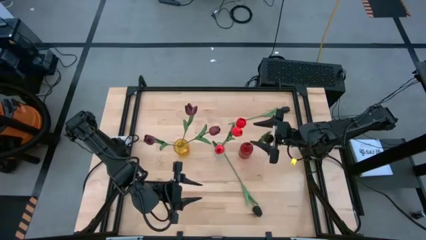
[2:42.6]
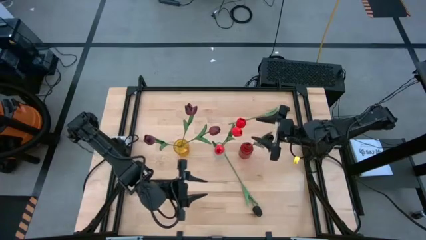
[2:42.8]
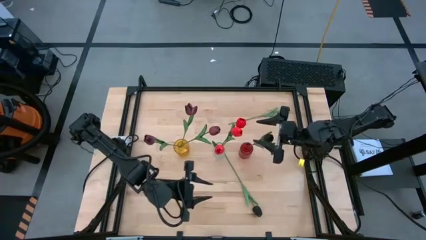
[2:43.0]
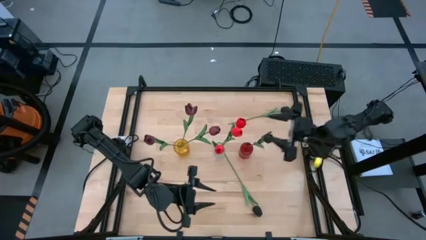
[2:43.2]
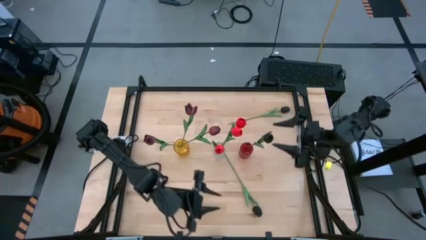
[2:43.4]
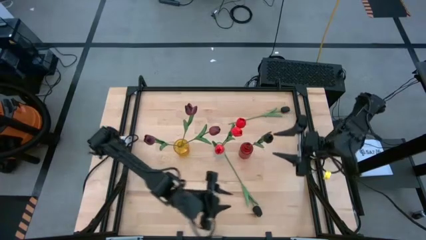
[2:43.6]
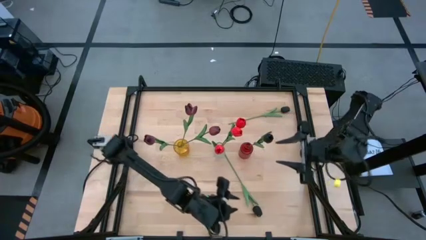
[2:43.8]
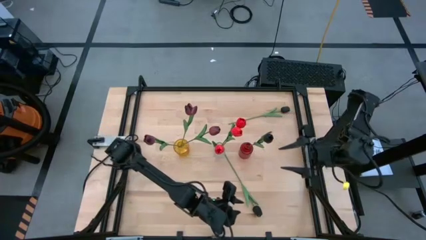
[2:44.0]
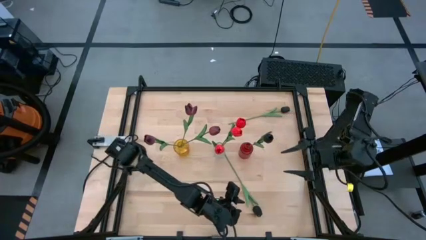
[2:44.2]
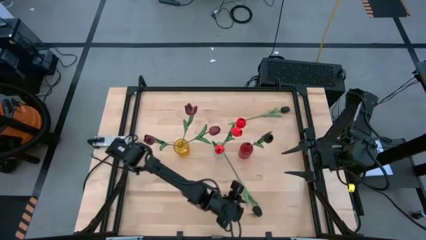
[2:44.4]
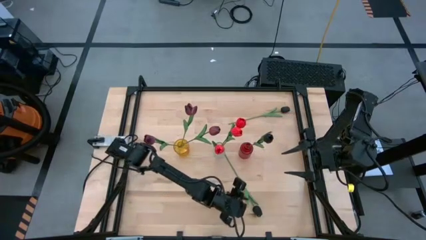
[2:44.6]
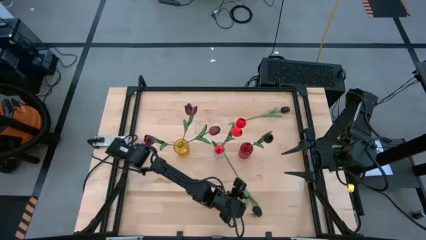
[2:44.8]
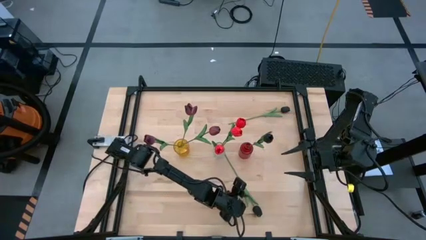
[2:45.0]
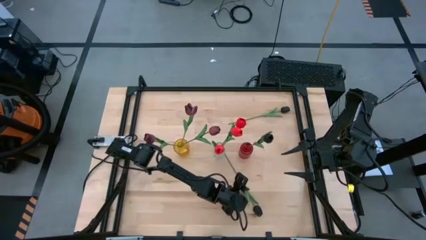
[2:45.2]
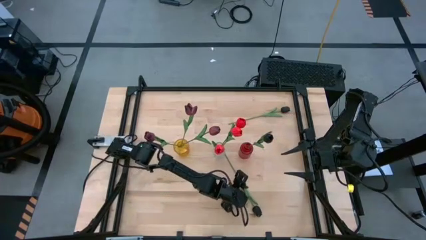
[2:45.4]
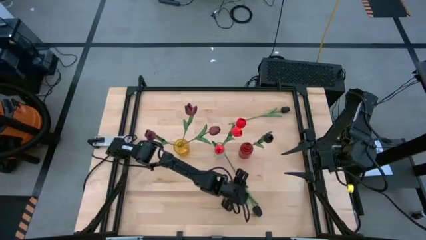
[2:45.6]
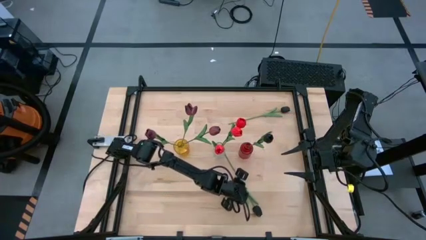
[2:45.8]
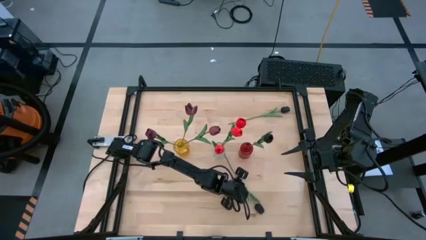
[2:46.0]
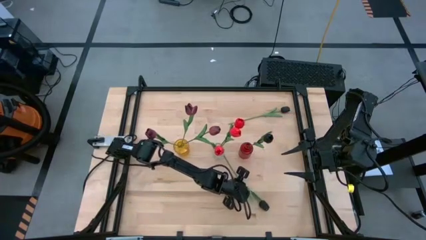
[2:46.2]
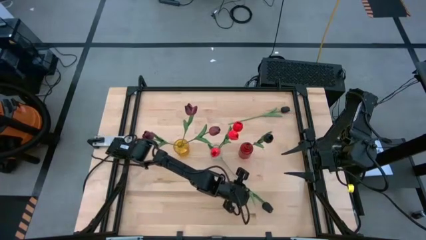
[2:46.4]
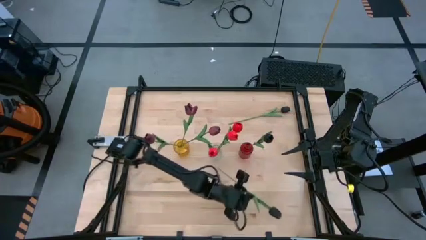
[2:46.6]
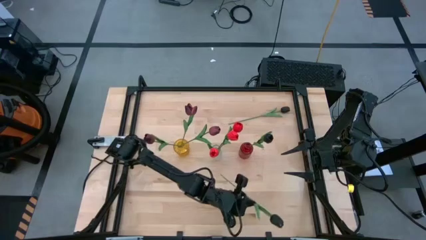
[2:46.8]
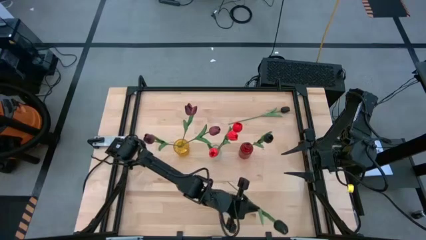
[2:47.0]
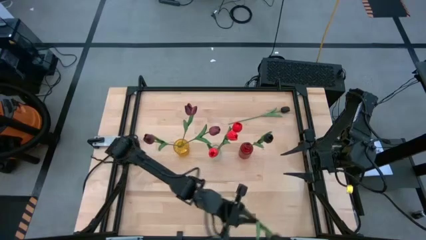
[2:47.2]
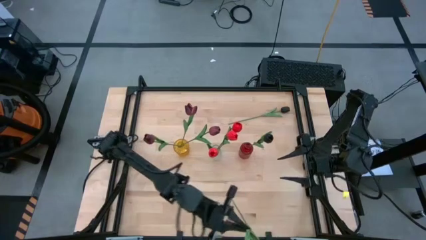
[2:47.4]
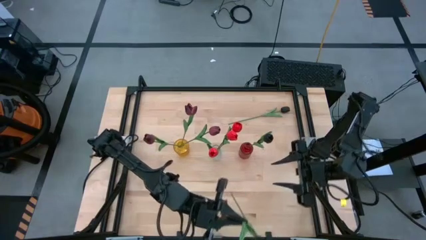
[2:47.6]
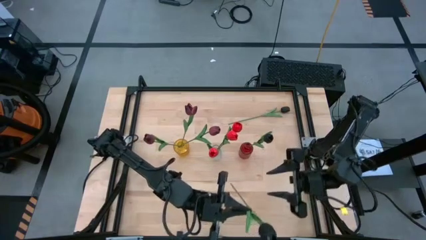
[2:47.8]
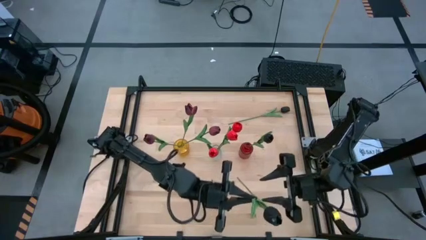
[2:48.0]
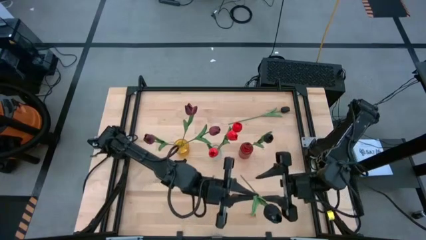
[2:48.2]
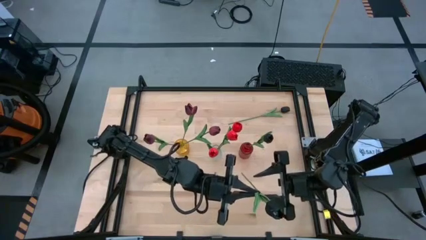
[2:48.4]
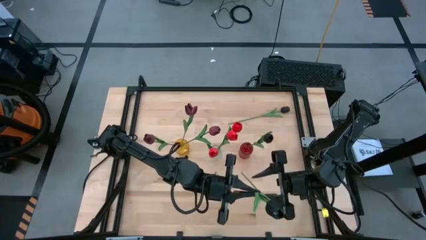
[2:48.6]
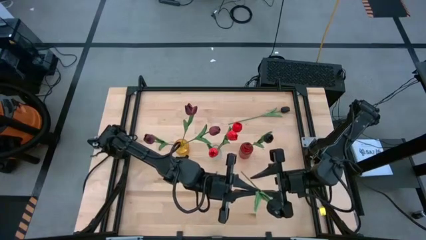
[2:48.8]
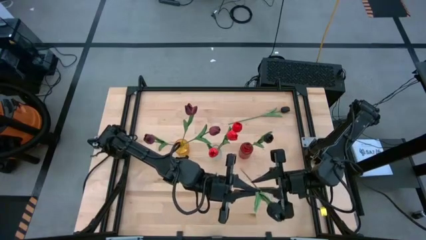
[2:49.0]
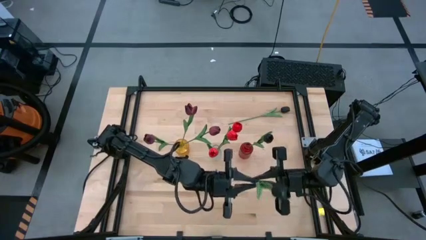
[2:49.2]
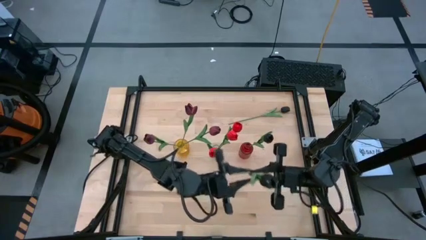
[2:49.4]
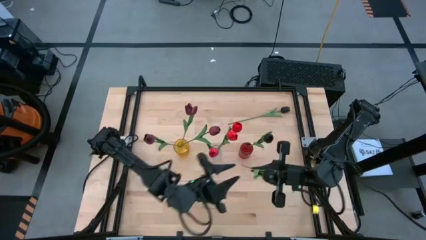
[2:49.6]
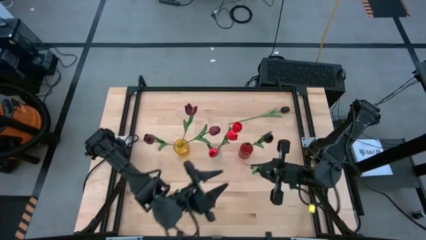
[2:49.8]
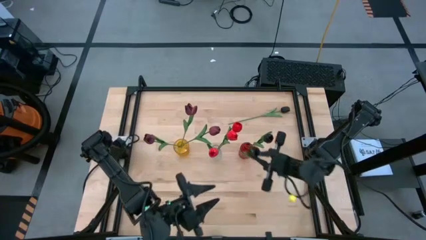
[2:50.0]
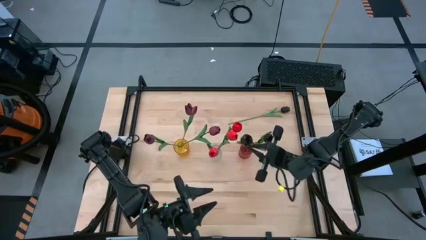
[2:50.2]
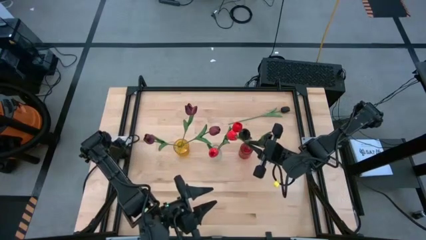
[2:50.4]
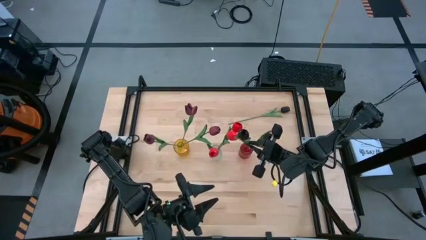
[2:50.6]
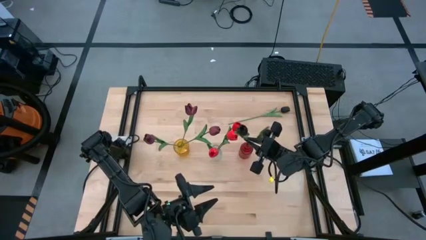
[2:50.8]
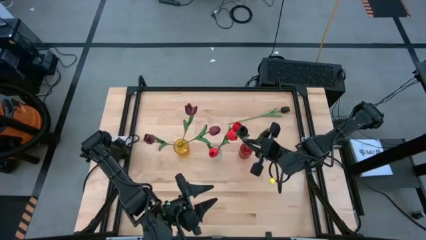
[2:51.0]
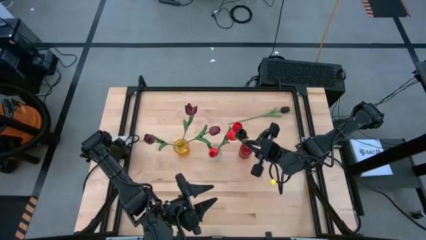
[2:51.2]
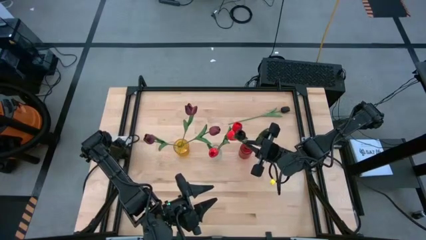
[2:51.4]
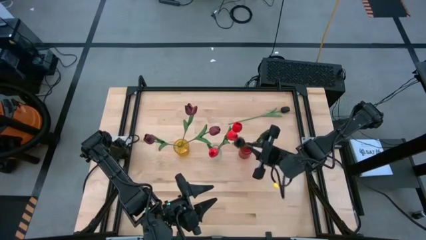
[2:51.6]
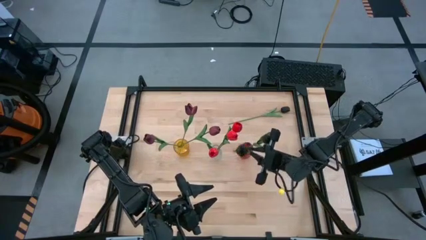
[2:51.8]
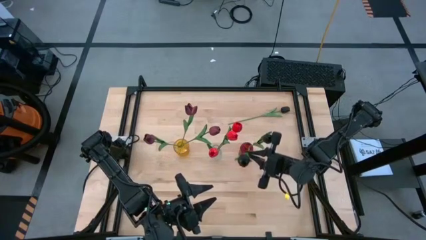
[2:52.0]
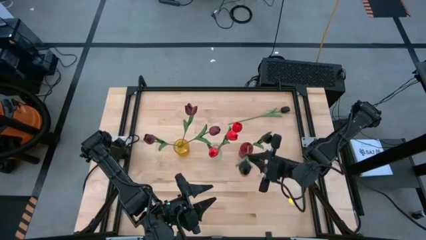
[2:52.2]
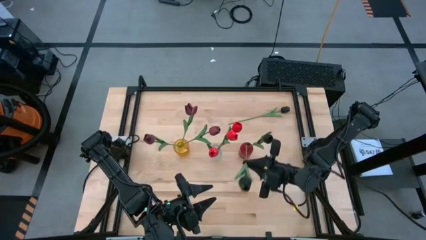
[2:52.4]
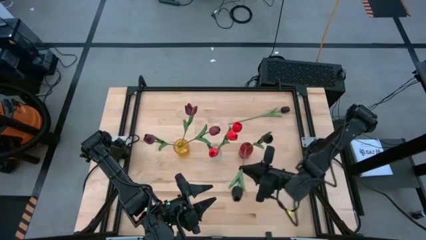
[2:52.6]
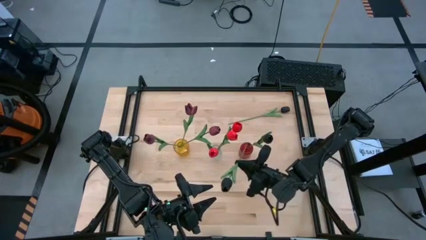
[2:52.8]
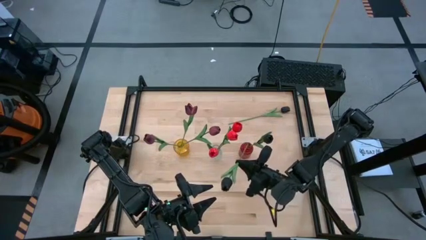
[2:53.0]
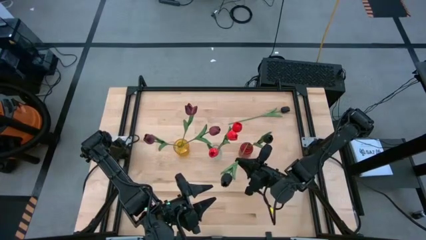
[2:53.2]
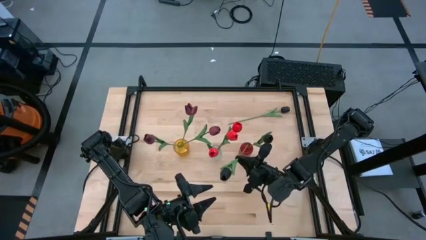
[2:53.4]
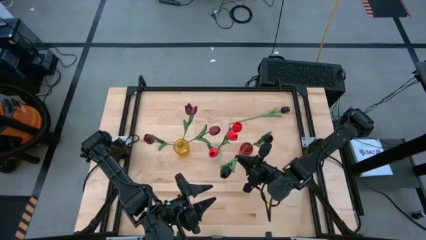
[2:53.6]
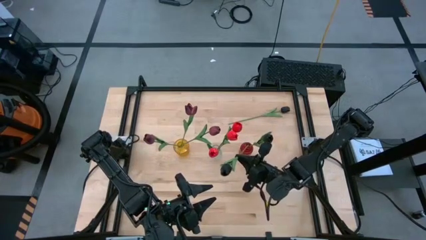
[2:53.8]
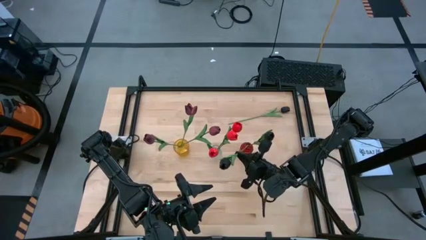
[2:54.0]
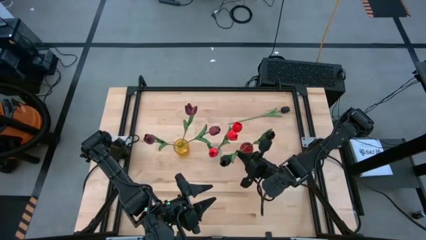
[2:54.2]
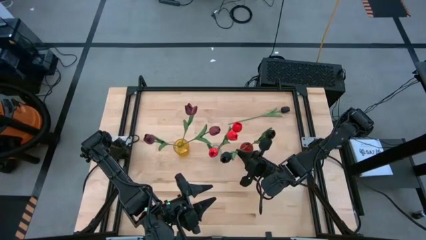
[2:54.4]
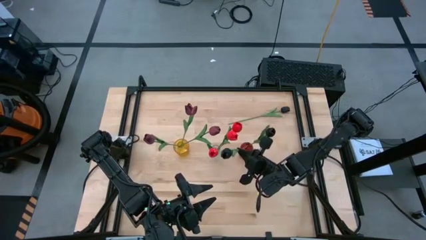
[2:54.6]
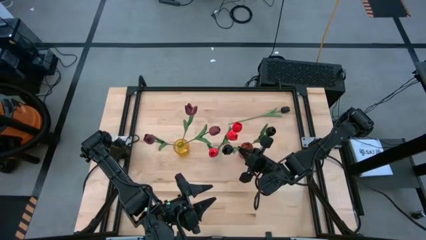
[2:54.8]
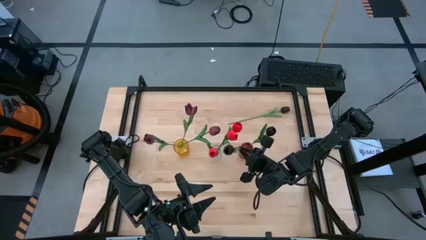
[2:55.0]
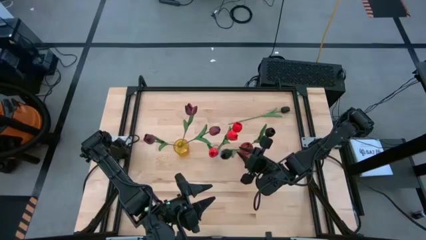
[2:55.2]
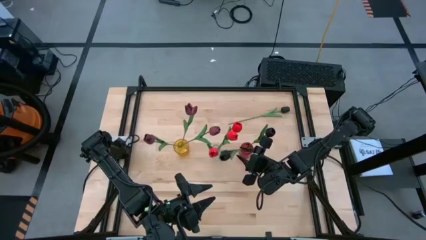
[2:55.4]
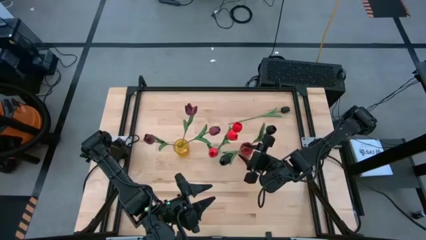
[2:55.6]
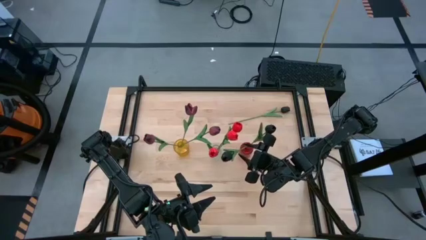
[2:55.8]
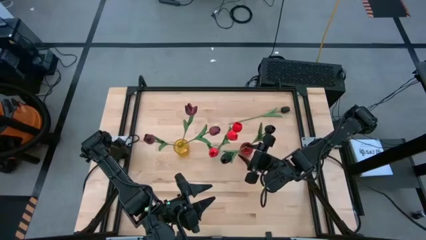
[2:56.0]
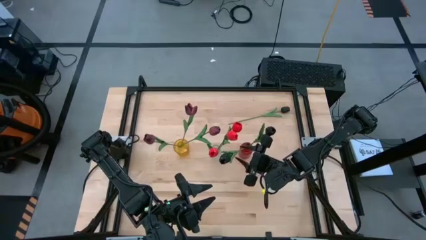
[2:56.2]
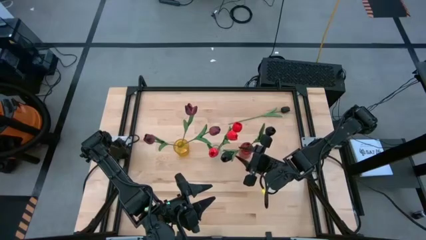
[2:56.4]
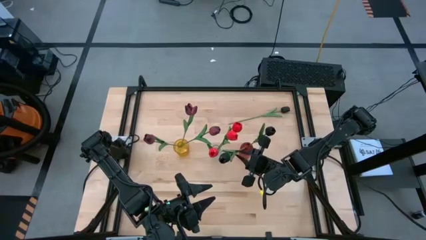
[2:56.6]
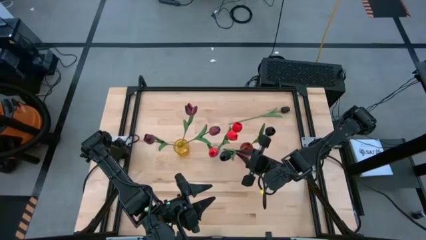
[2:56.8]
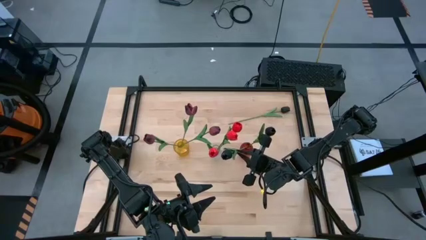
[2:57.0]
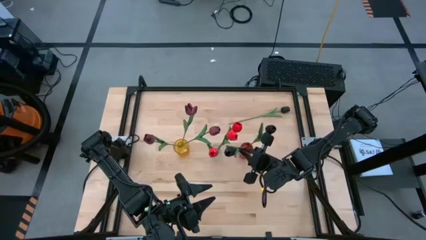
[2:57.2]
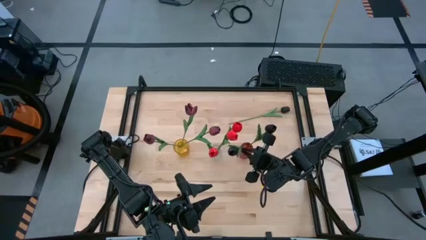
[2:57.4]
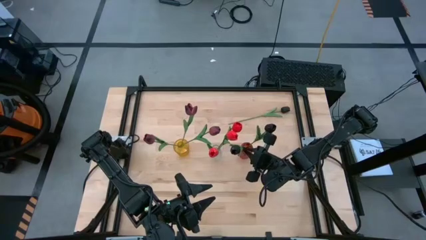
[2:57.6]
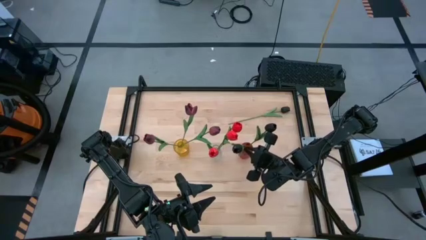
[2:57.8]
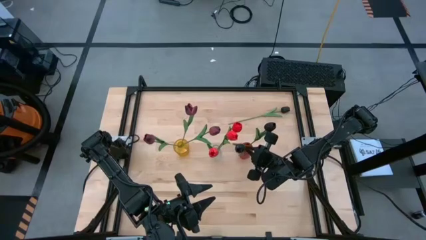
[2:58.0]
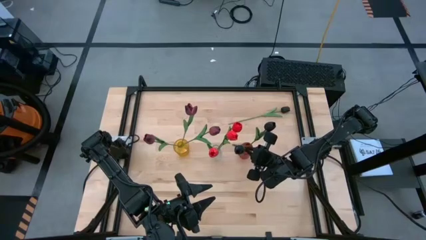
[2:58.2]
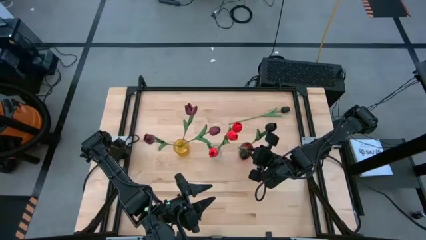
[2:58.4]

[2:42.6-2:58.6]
Task: Sort flowers into vase by color
Put the bottom black tulip into the red vase
